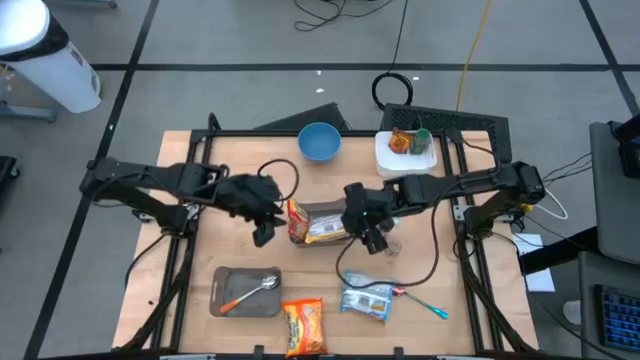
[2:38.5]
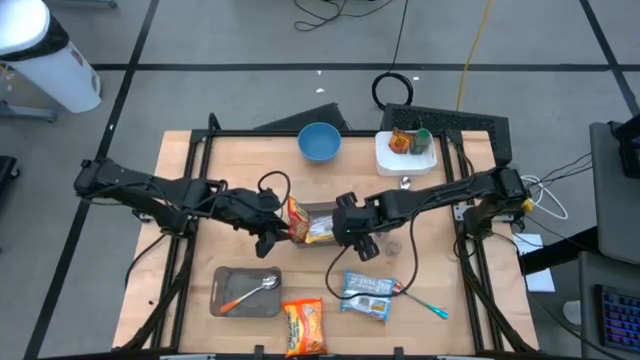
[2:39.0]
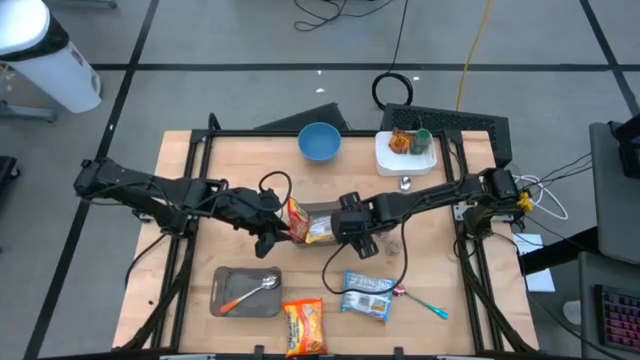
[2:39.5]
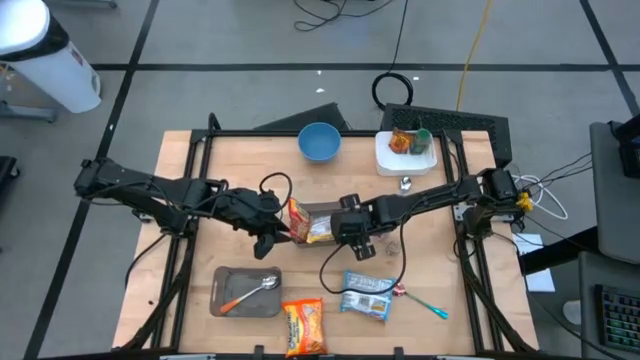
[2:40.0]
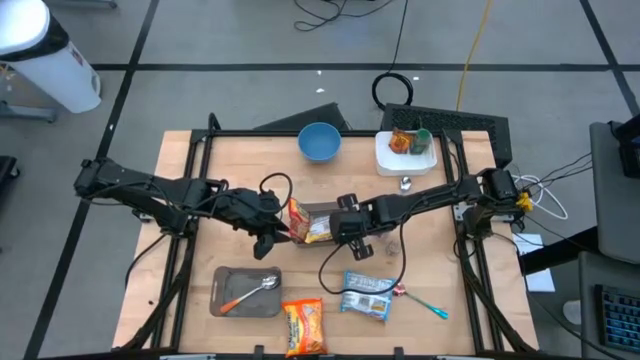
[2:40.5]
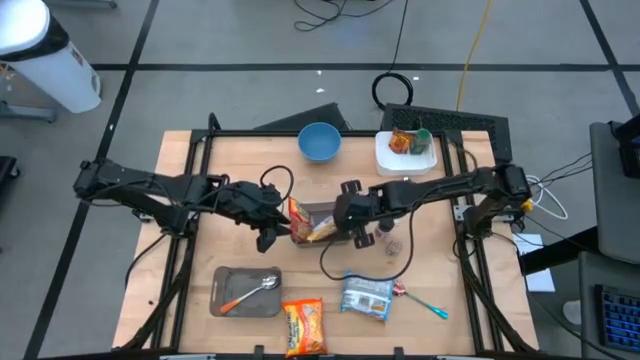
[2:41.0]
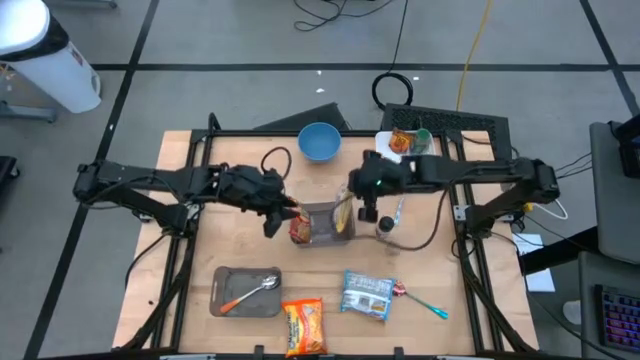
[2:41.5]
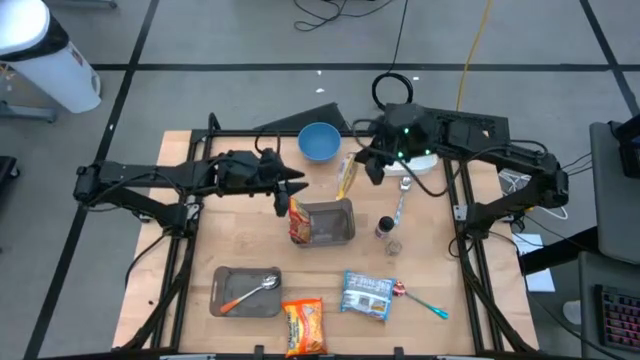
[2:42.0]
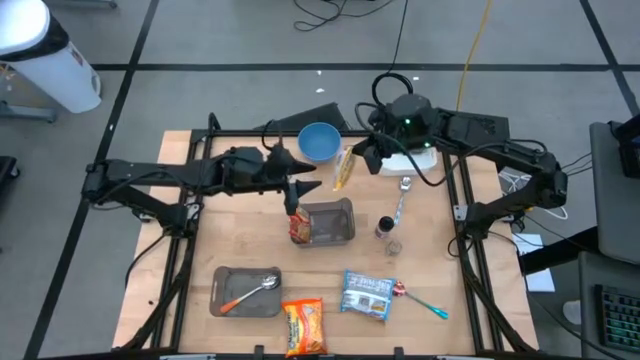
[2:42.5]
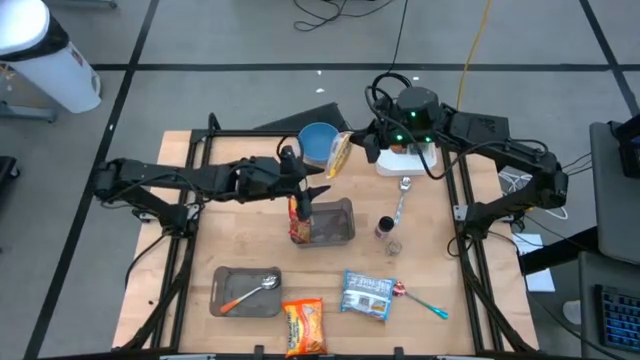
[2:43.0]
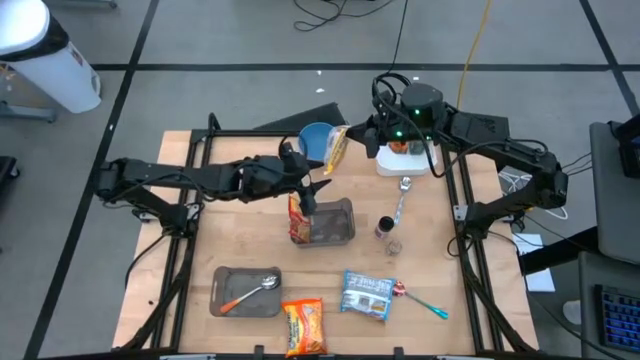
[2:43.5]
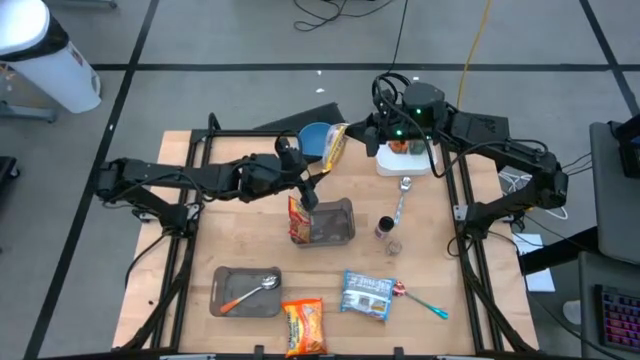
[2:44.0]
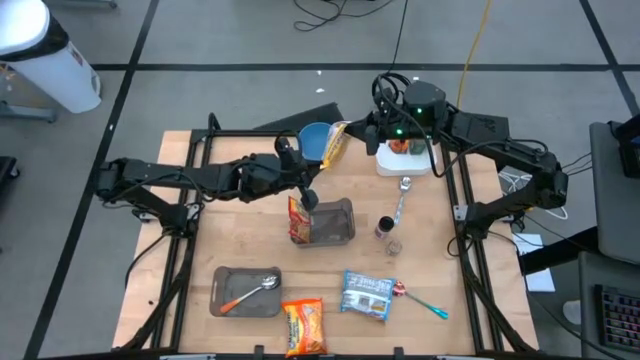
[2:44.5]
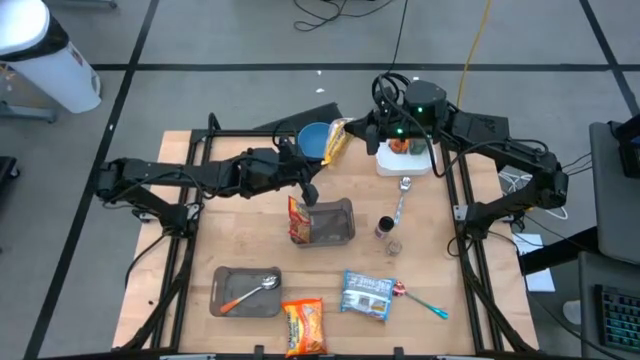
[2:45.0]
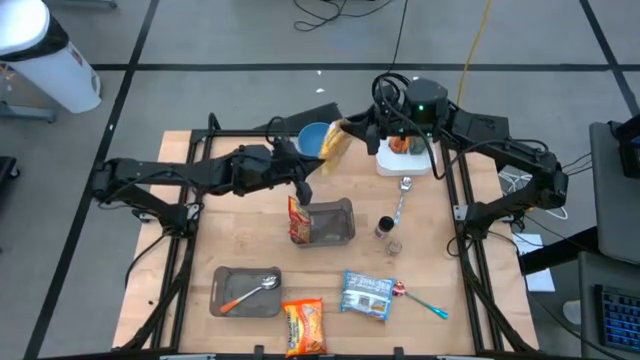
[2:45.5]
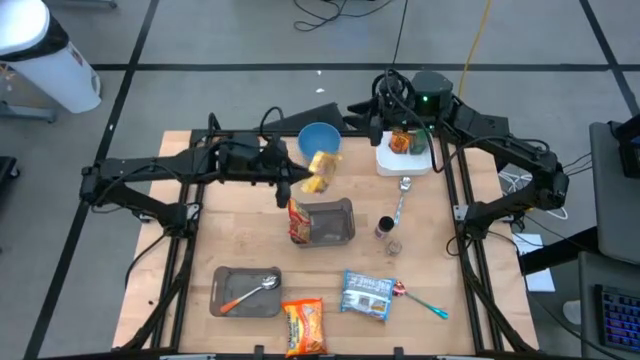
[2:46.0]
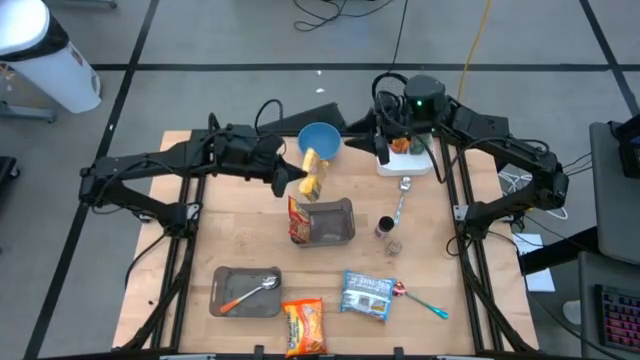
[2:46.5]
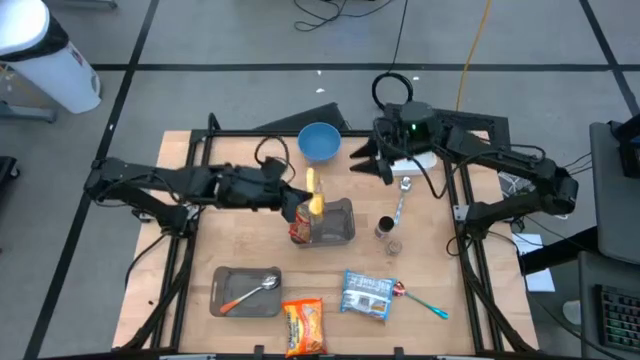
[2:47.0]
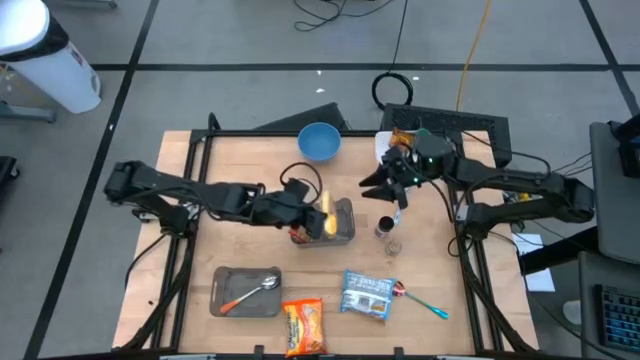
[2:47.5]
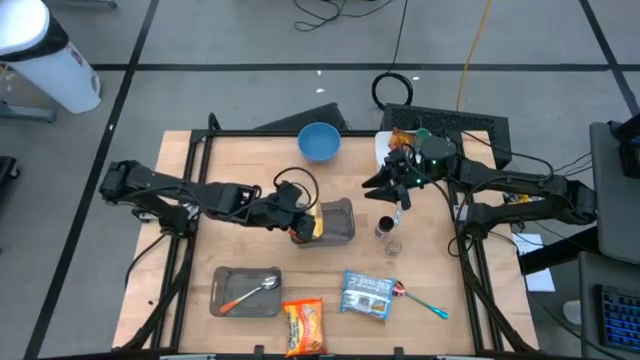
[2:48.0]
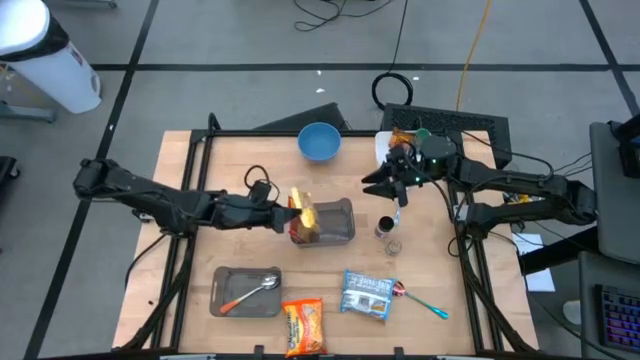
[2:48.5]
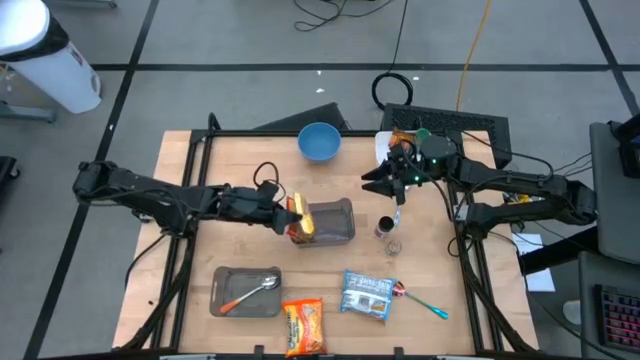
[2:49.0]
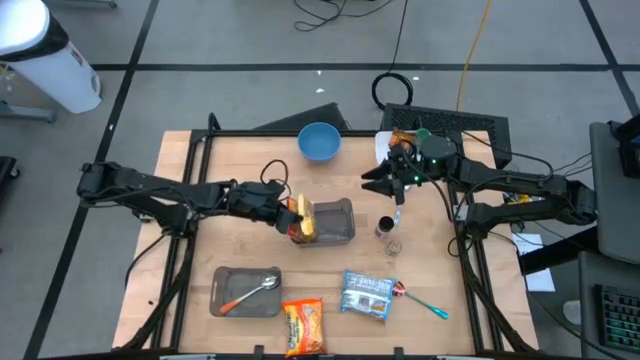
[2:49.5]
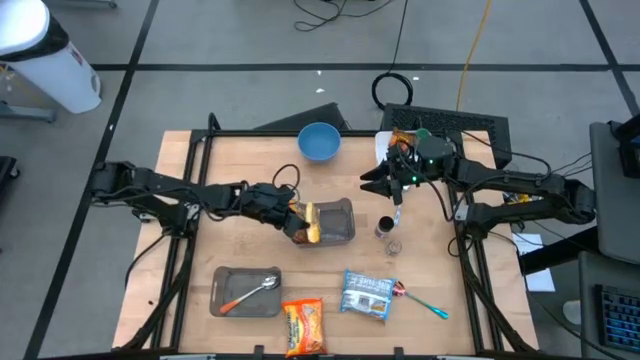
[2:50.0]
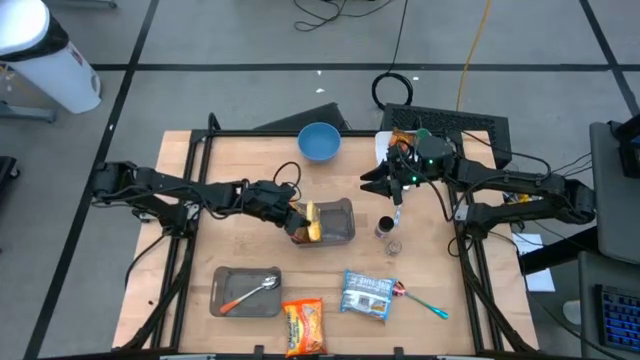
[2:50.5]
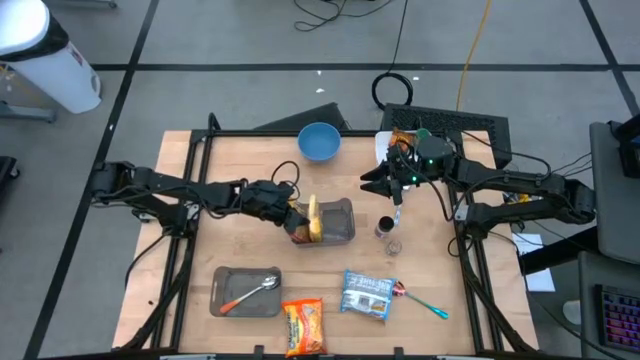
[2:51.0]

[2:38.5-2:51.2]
Task: Pick & Place Food Item
Put the yellow noodle pack into the top black bin

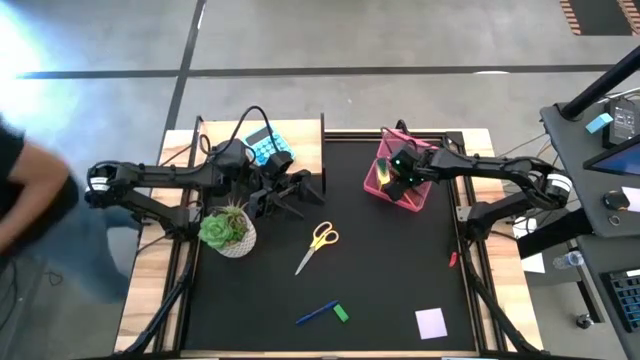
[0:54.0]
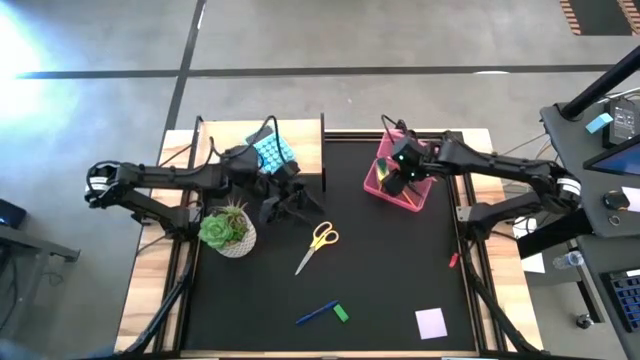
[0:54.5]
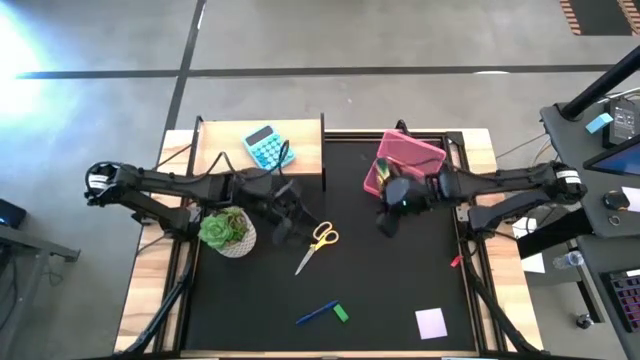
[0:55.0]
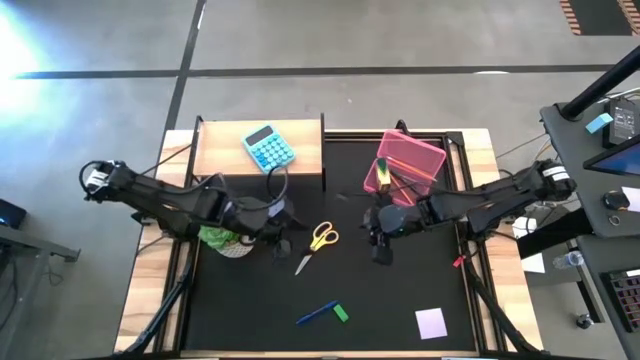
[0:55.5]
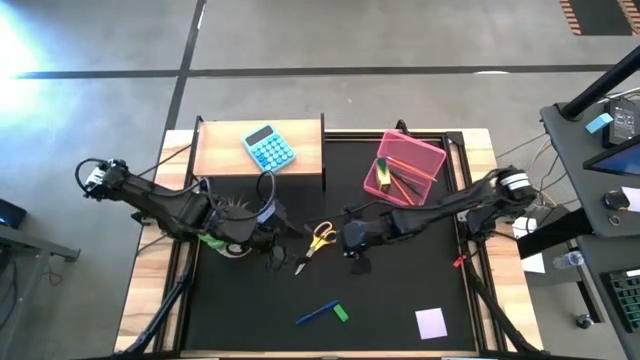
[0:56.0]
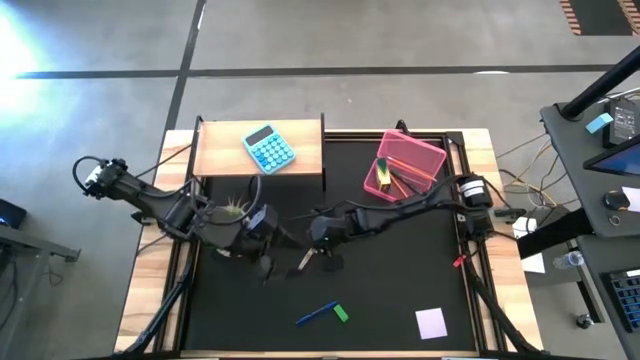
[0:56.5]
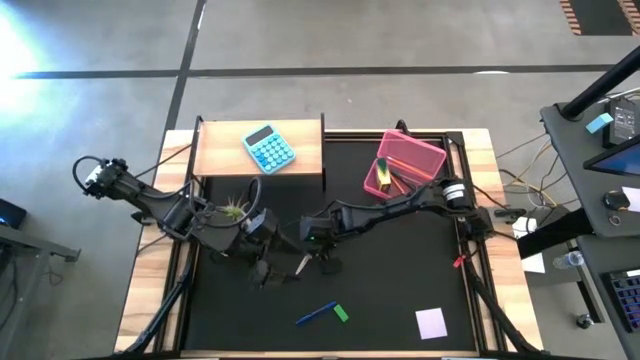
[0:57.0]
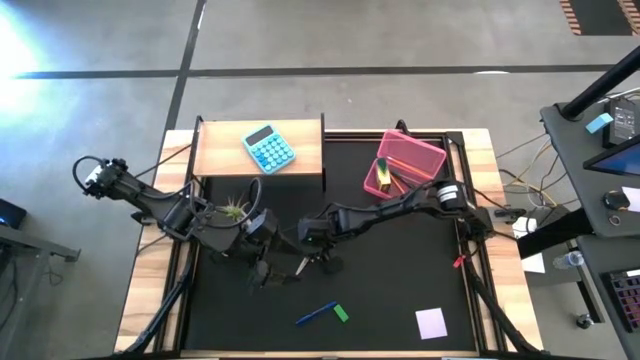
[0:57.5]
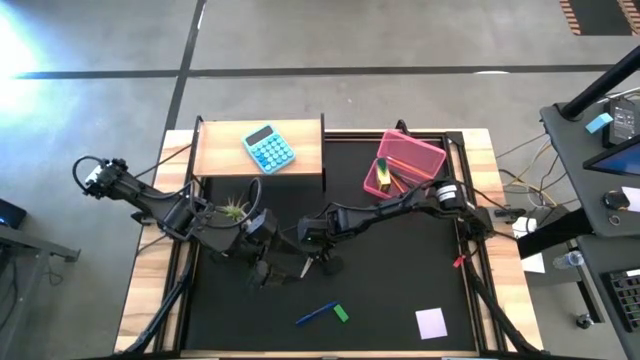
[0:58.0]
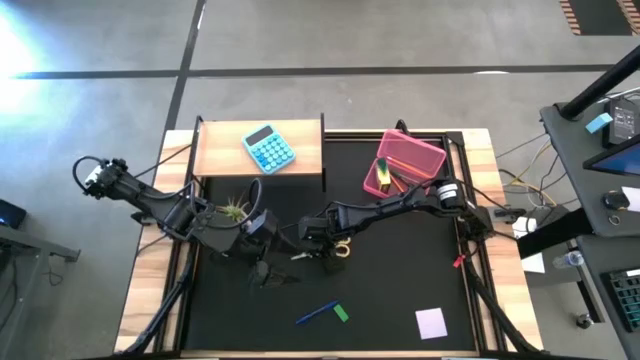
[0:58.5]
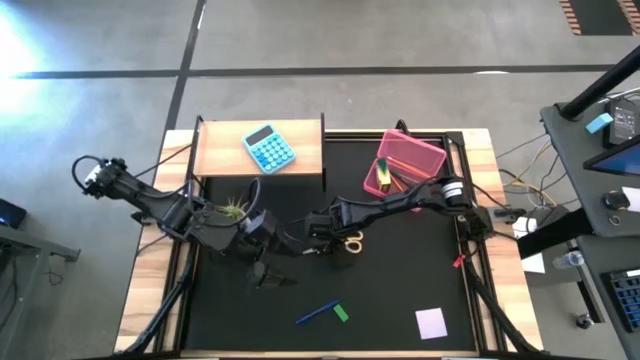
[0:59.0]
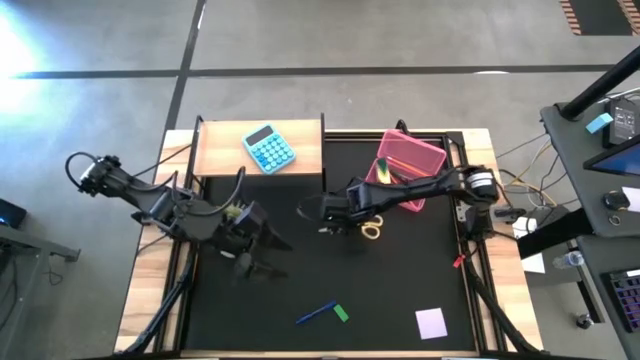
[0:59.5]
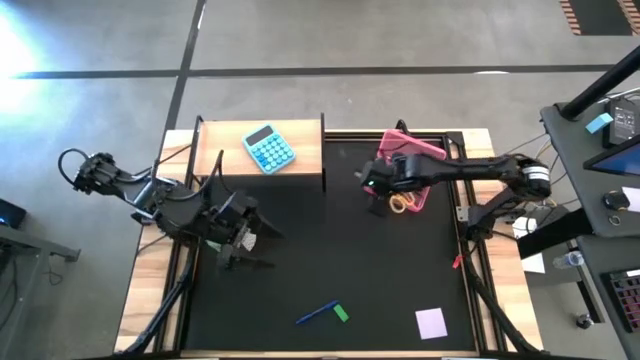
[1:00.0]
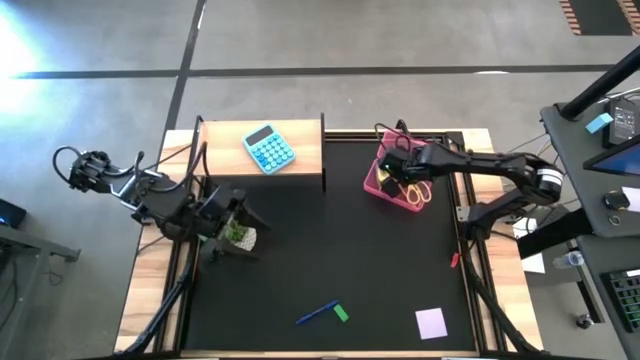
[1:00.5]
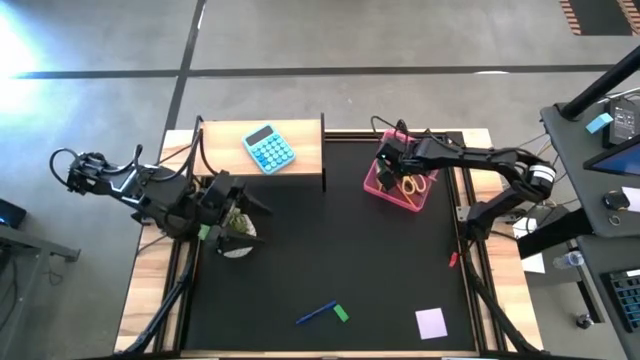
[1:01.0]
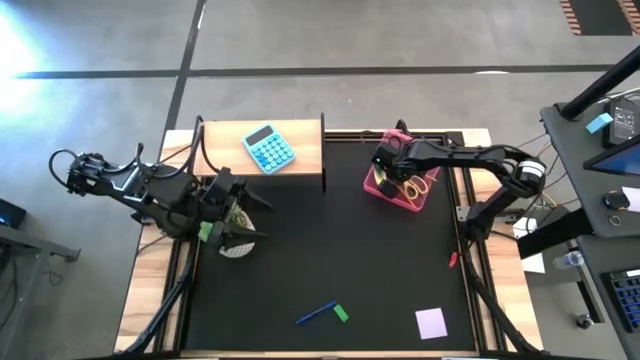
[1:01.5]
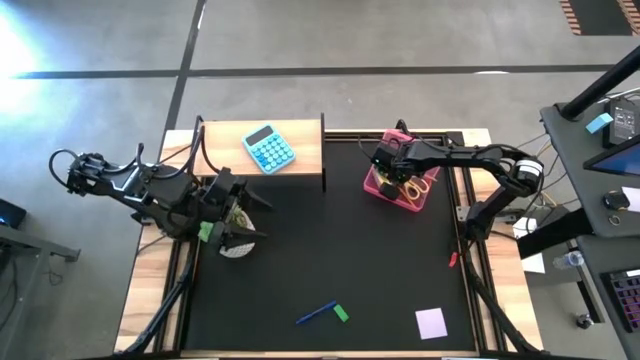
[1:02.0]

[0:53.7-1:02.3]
Task: Pack school essentials
Put the yellow scissors into the pink supply box
